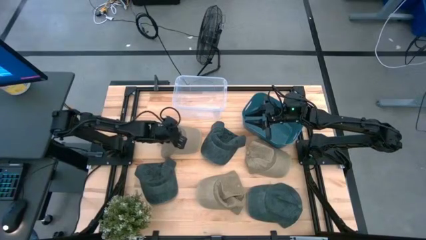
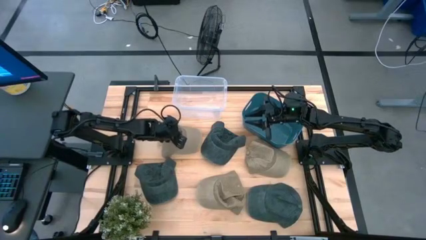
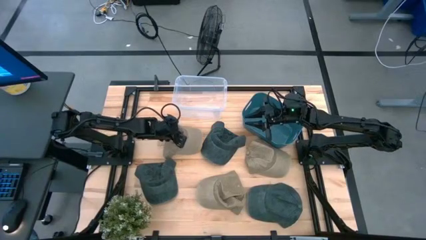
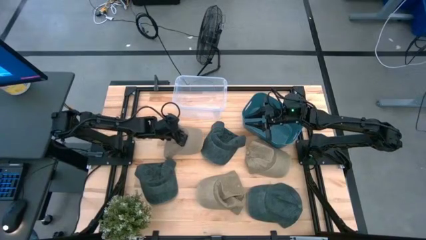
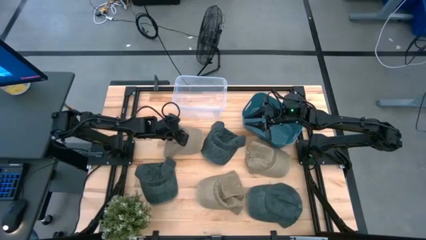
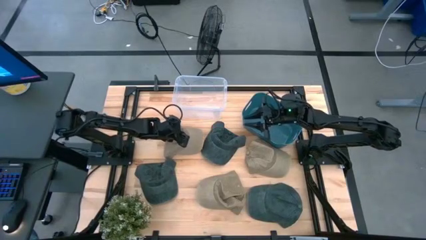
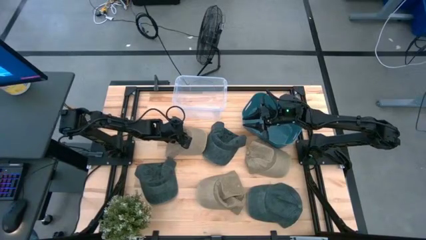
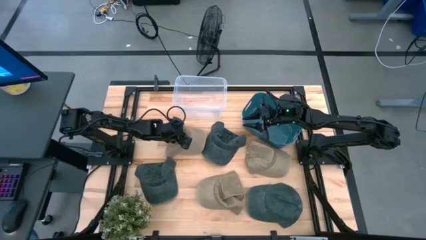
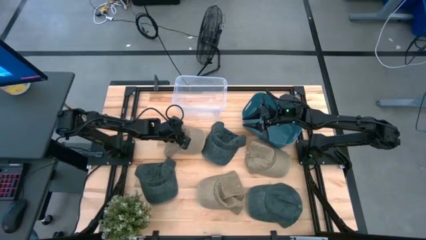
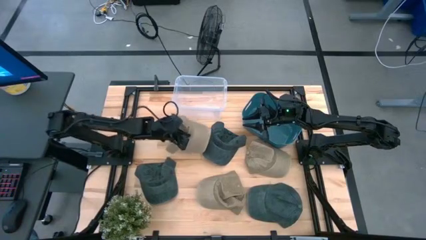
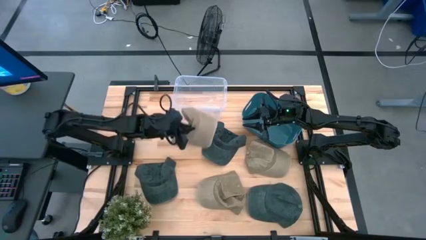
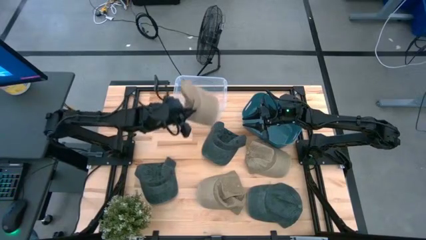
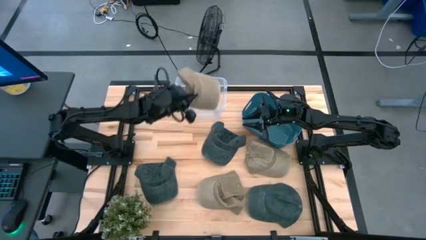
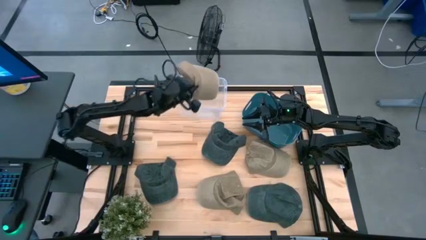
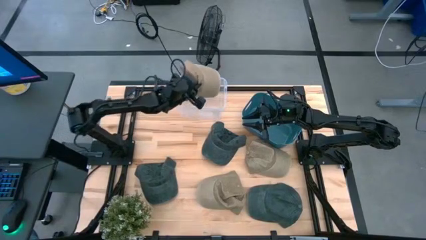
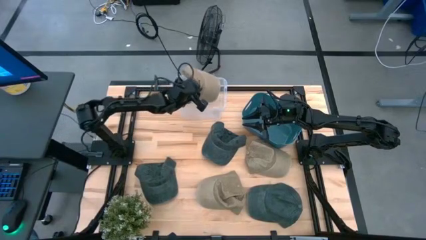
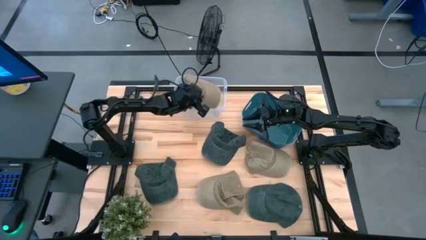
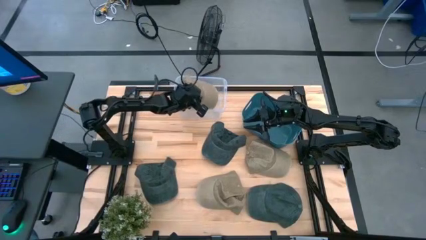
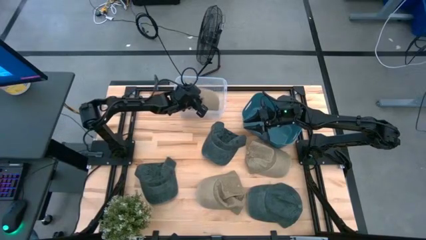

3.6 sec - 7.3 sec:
Task: Pick & Place hat
Put the top left brown cap into the transparent bin

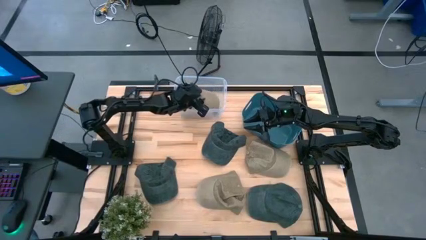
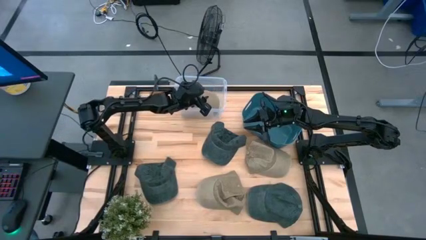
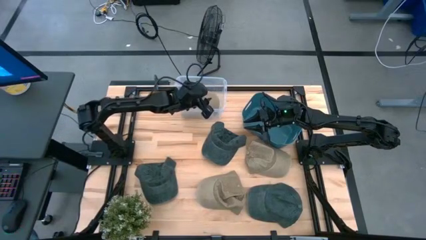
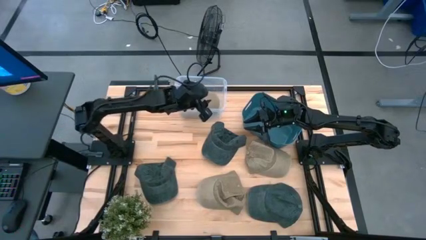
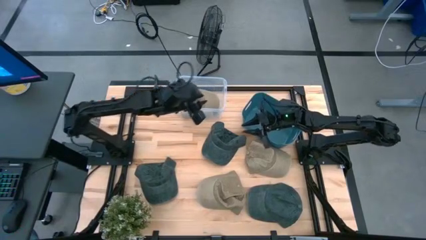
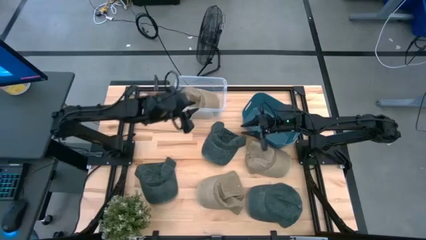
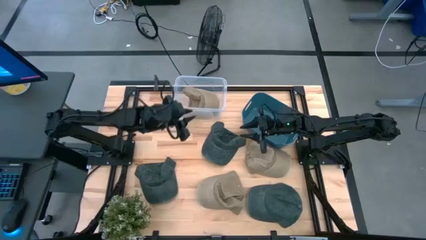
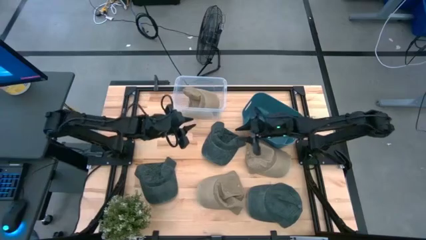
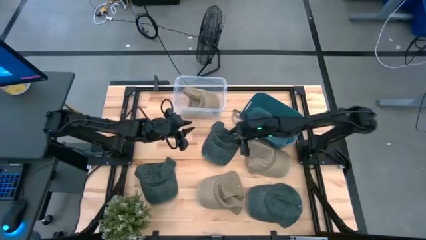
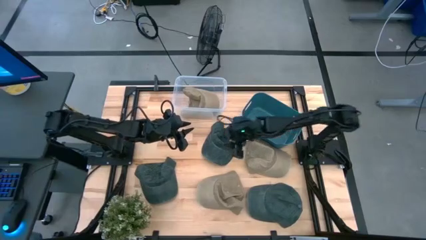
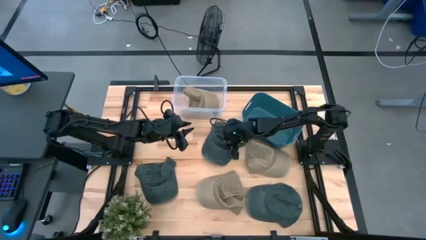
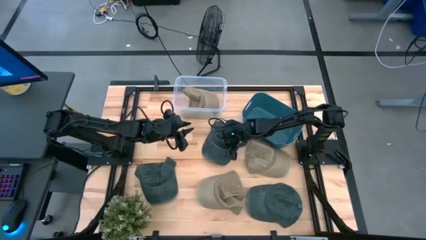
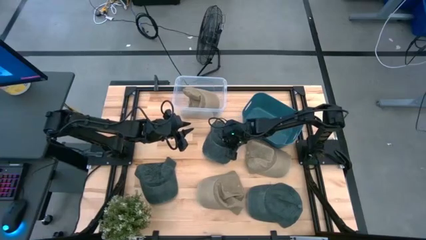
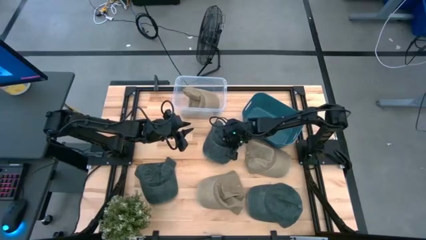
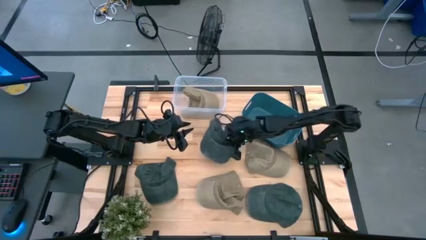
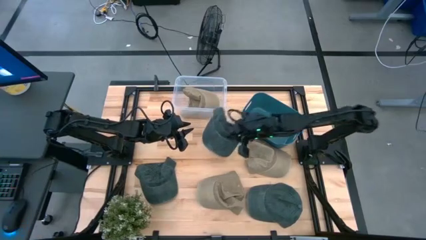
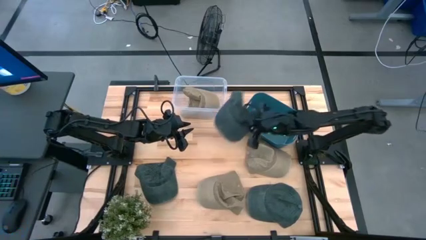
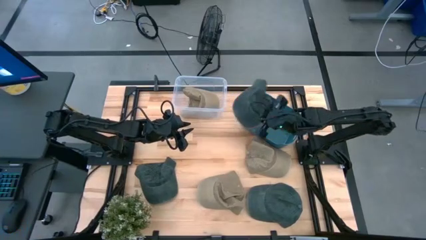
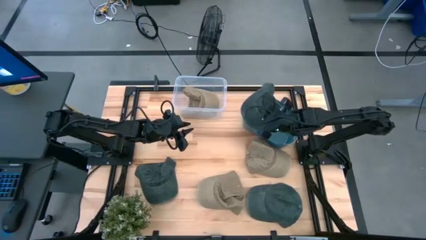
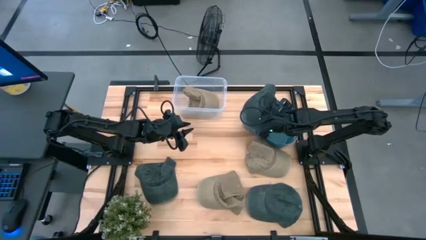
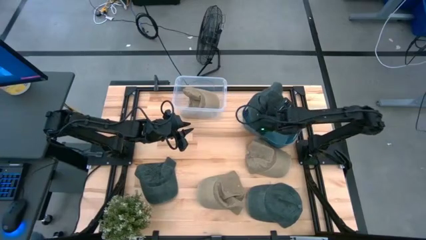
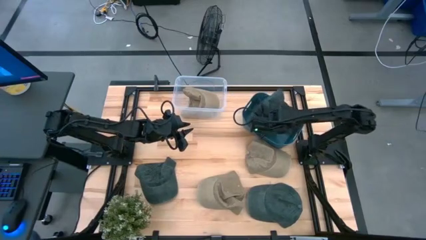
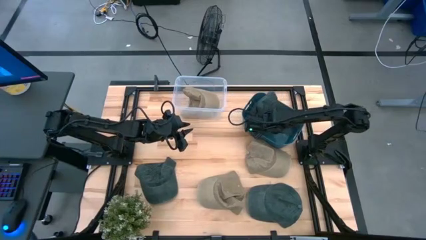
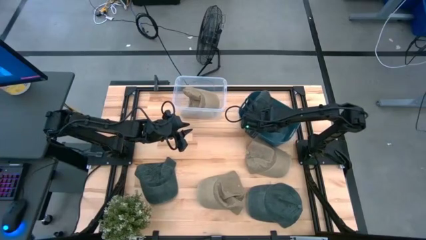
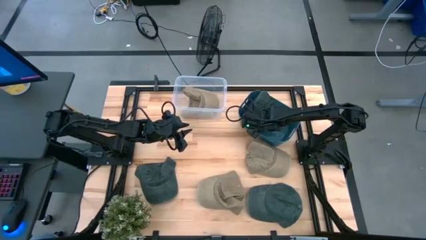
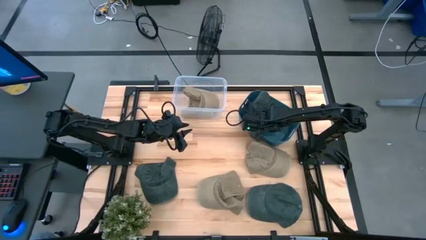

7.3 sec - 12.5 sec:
Put the top black cap into the blue bin

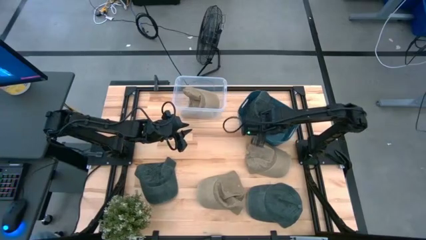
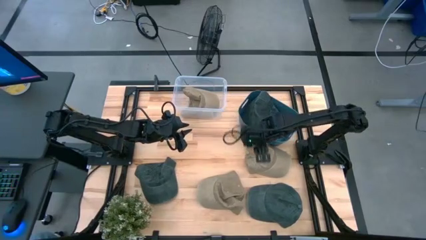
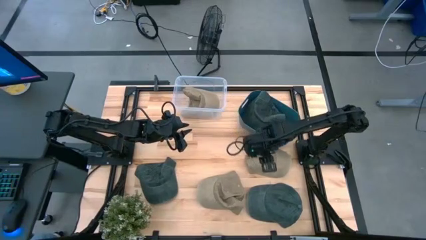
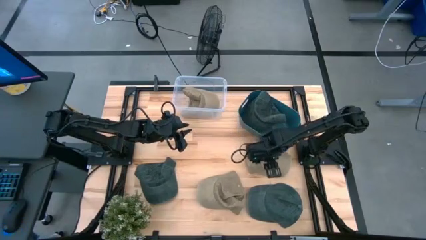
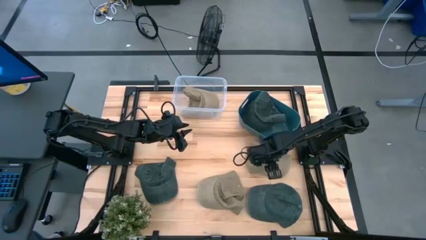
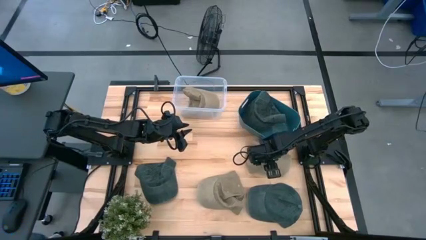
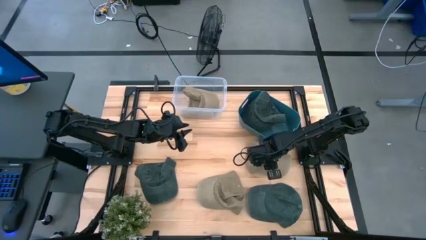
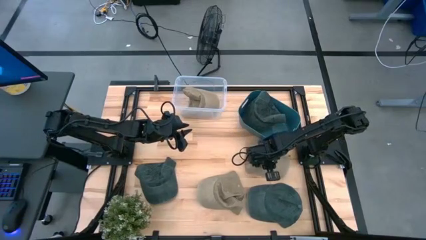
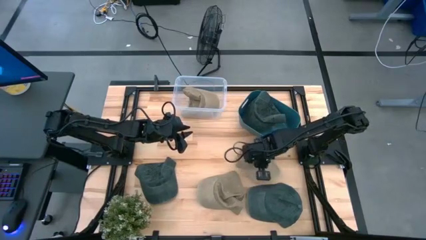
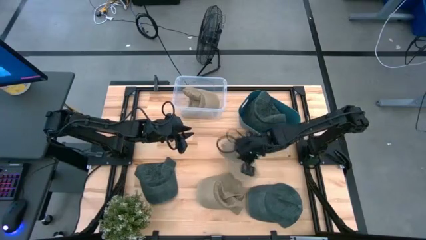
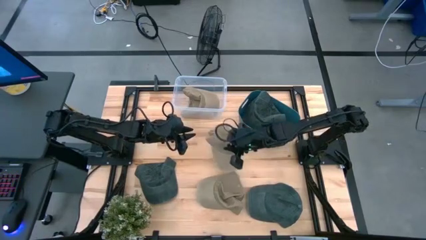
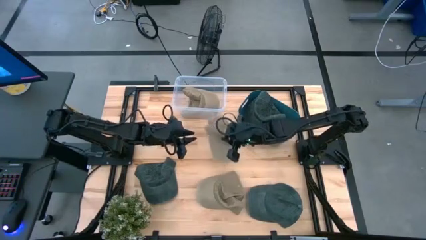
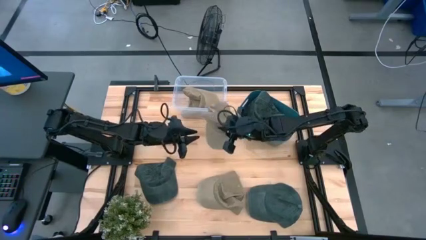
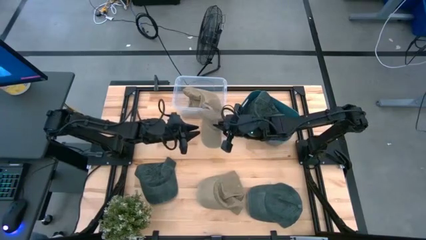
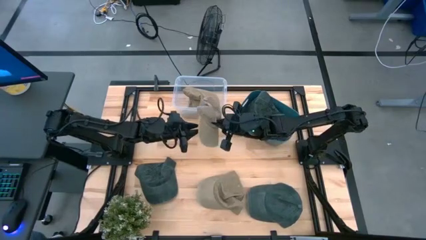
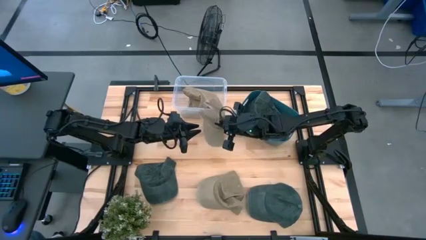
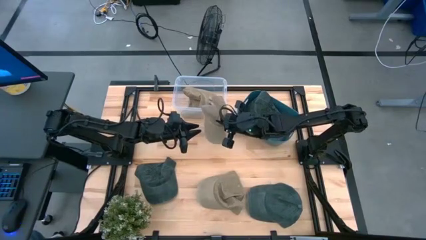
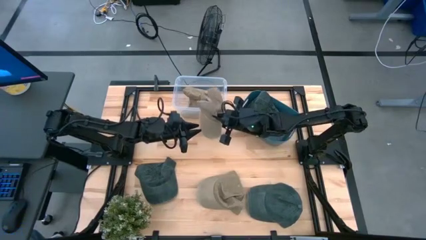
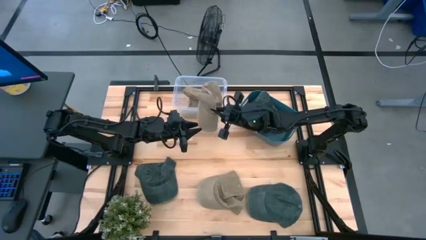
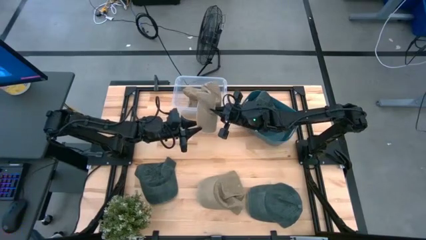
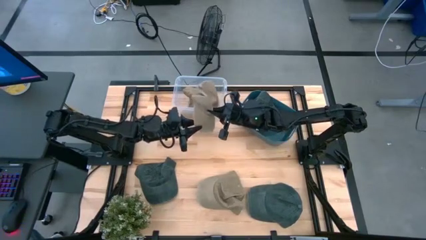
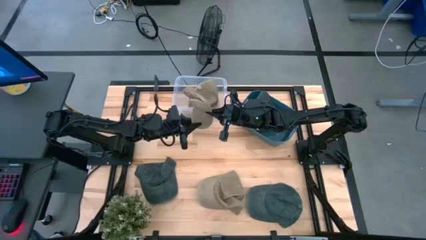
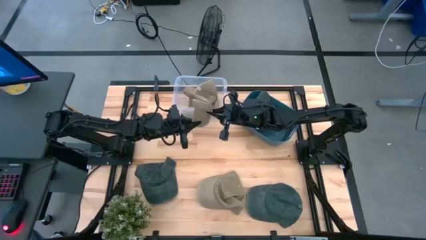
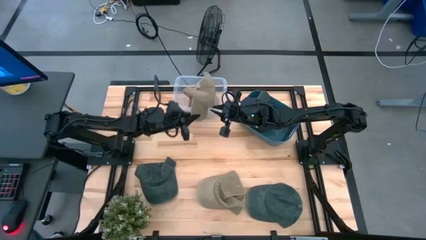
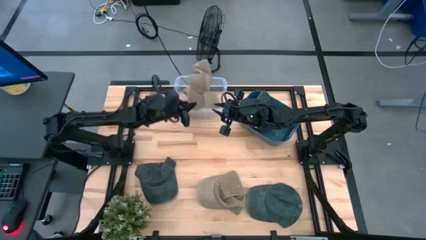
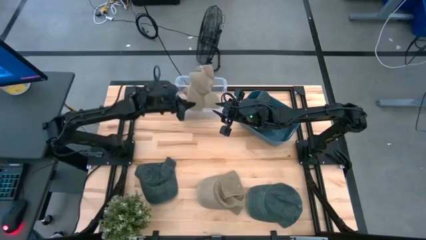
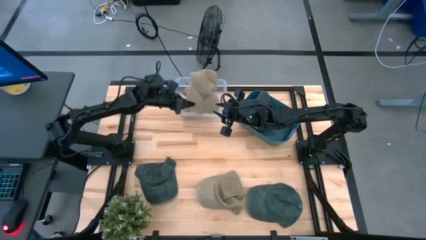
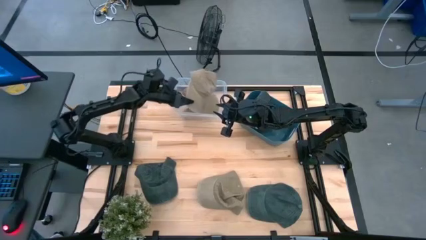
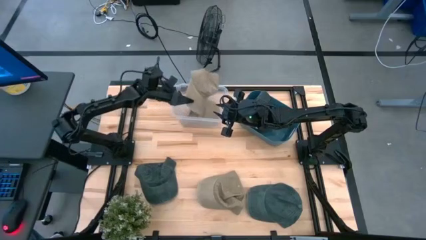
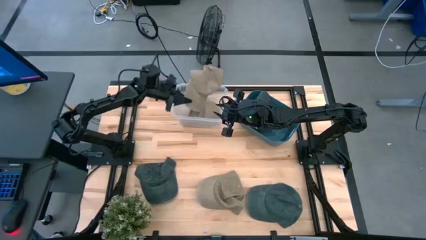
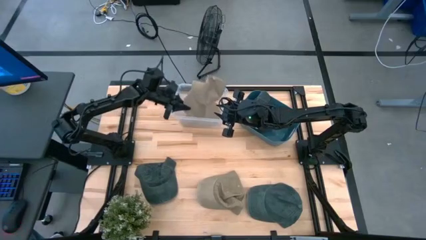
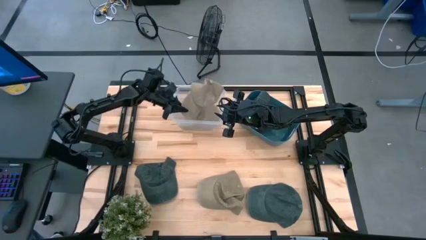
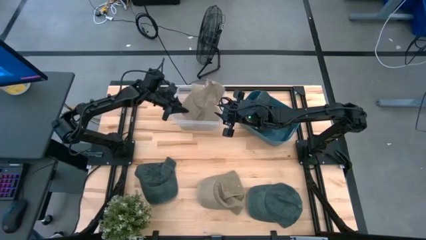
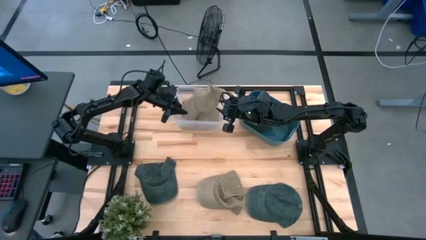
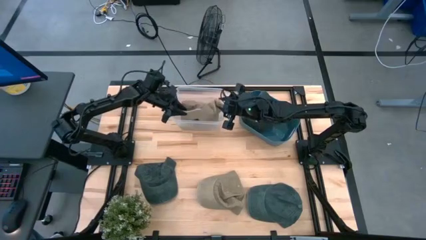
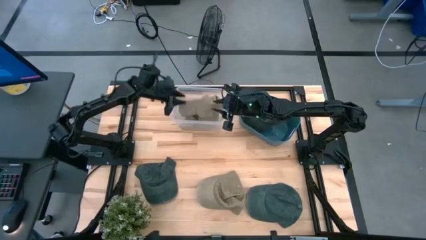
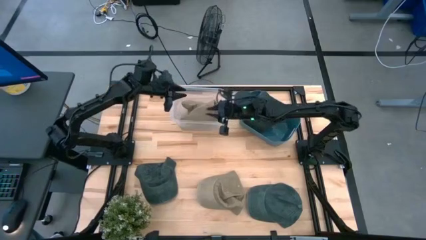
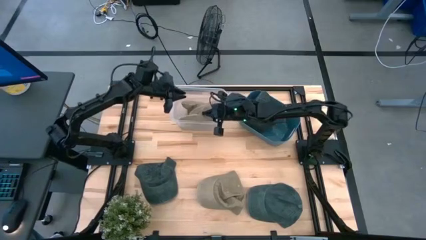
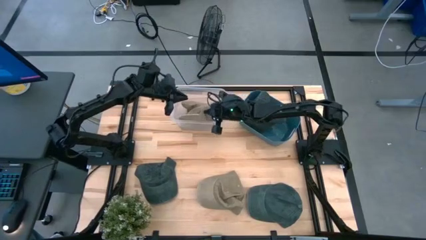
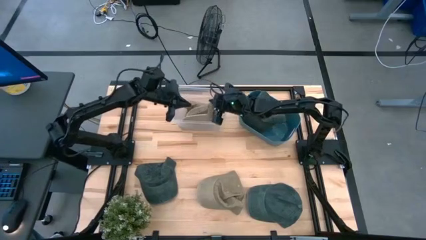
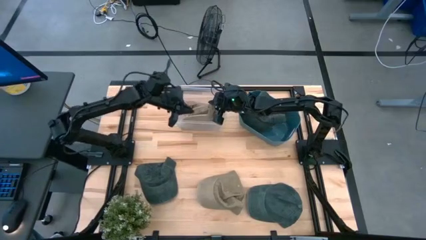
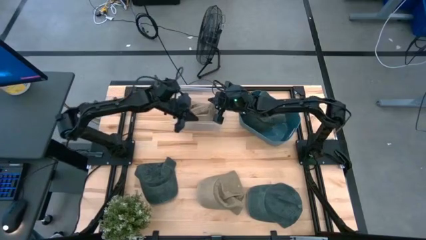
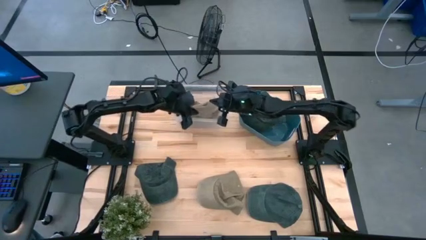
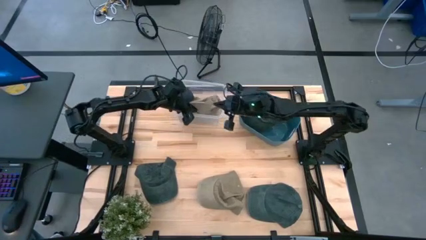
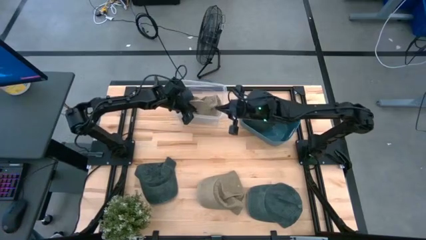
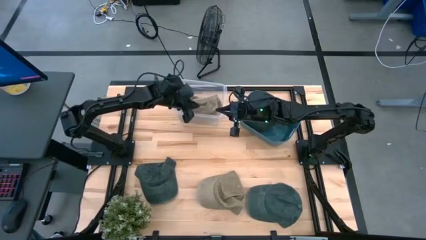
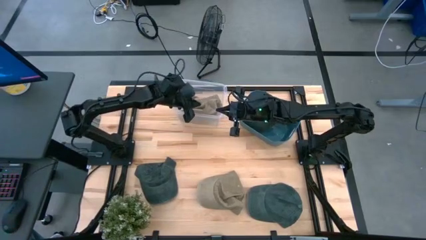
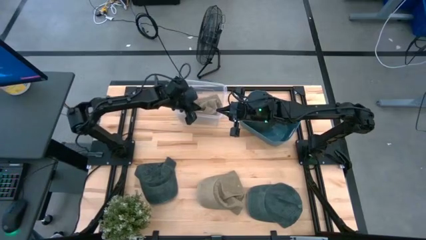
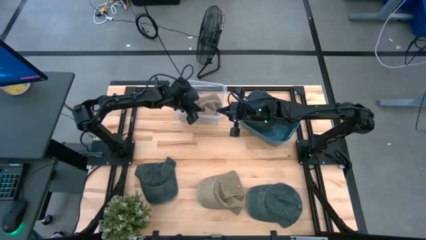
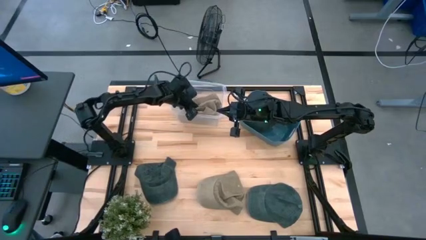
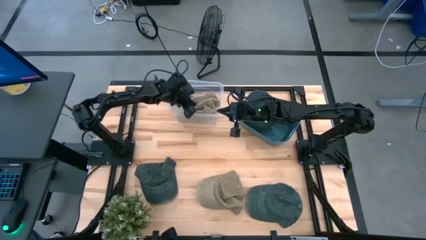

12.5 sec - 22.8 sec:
Put the top brown cap into the transparent bin
